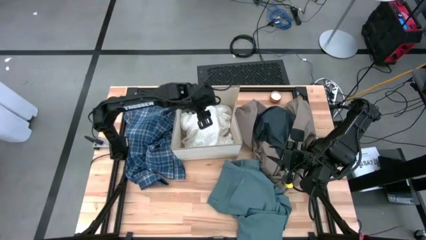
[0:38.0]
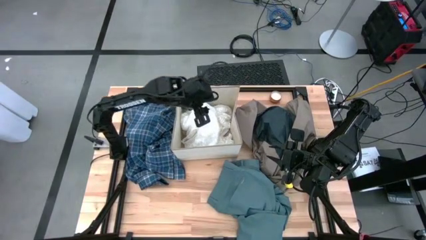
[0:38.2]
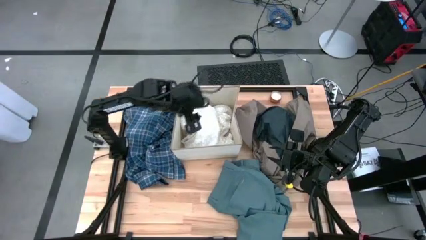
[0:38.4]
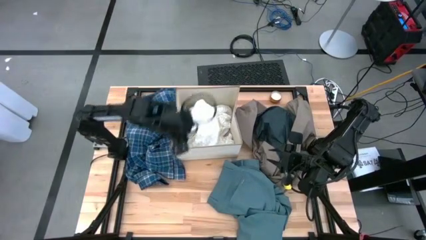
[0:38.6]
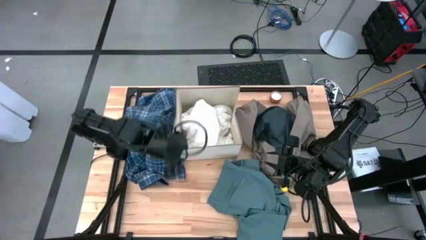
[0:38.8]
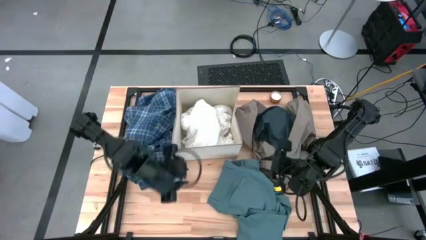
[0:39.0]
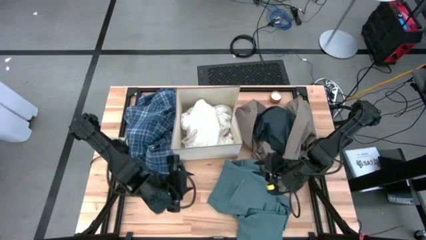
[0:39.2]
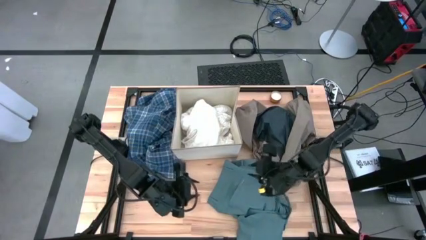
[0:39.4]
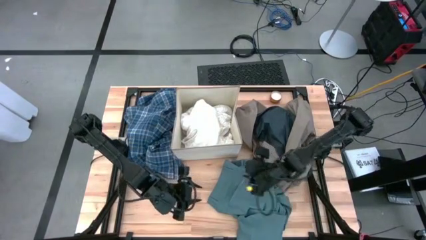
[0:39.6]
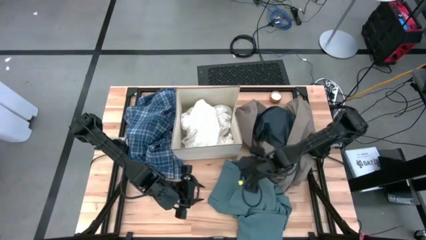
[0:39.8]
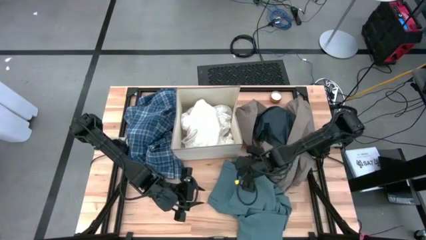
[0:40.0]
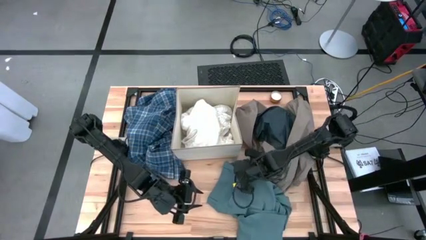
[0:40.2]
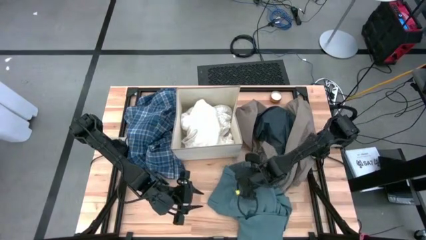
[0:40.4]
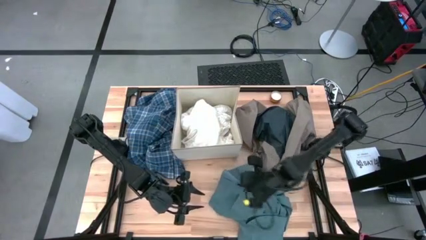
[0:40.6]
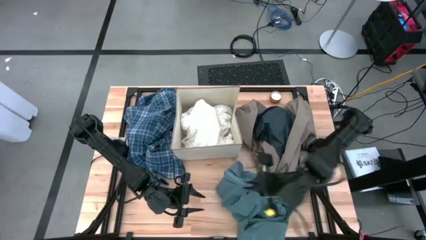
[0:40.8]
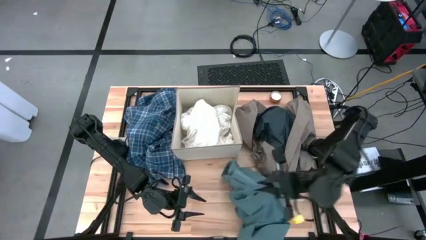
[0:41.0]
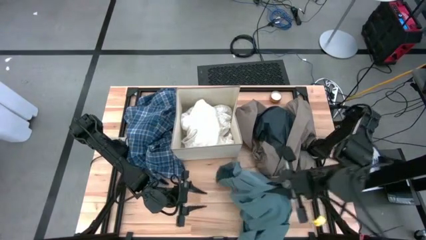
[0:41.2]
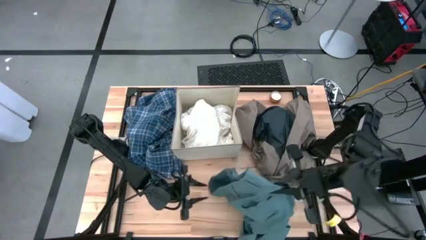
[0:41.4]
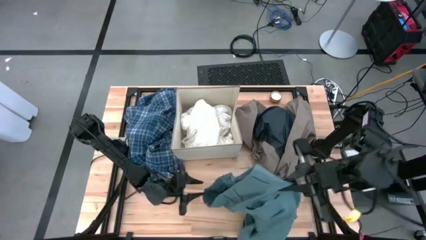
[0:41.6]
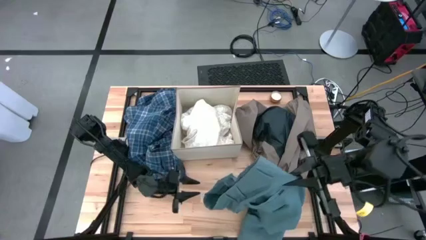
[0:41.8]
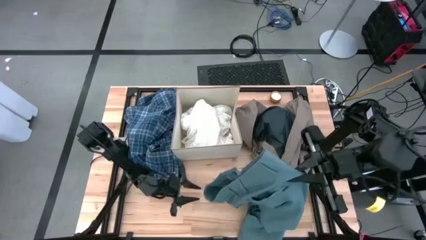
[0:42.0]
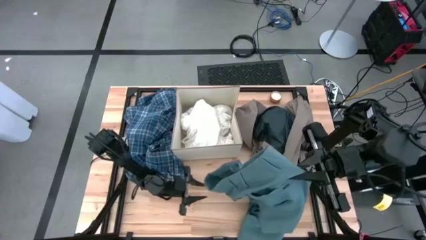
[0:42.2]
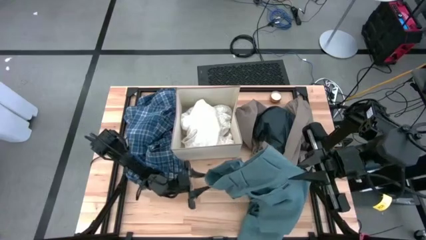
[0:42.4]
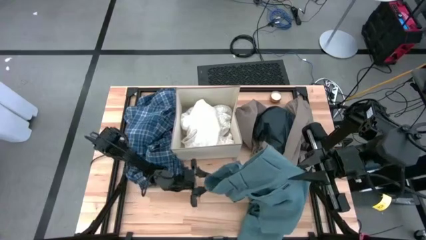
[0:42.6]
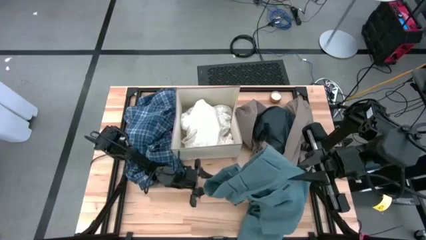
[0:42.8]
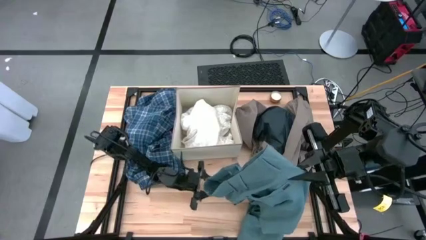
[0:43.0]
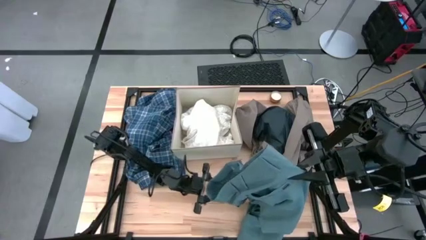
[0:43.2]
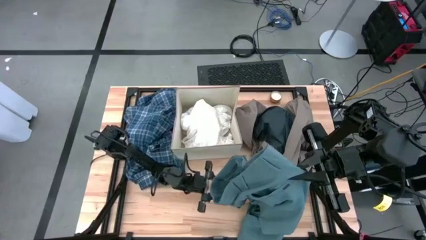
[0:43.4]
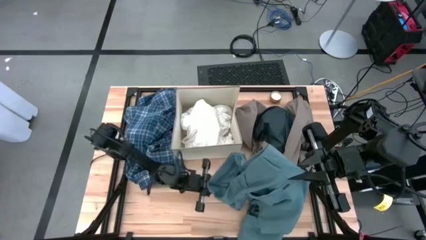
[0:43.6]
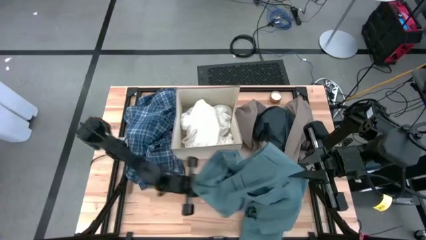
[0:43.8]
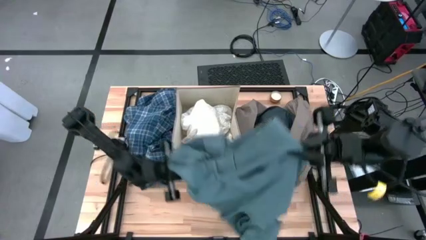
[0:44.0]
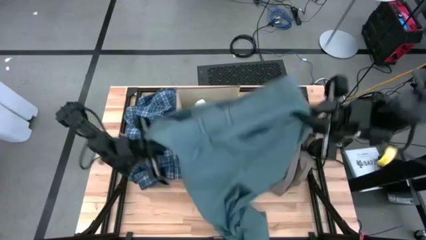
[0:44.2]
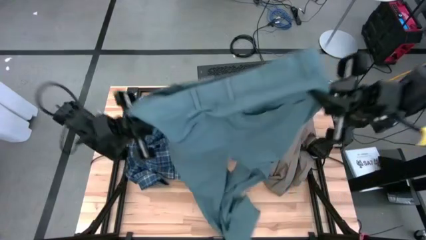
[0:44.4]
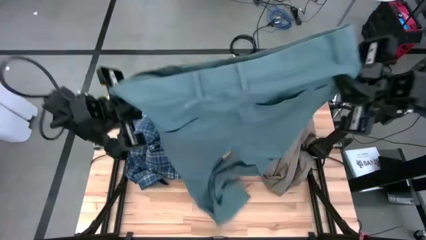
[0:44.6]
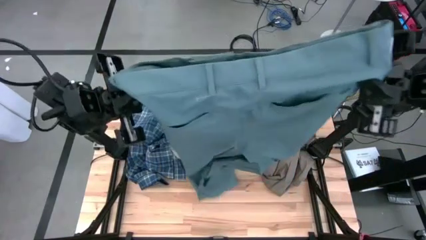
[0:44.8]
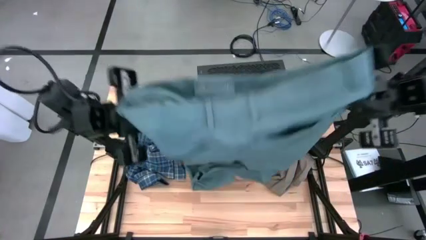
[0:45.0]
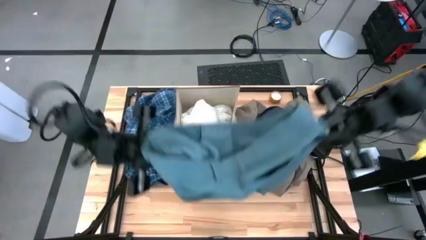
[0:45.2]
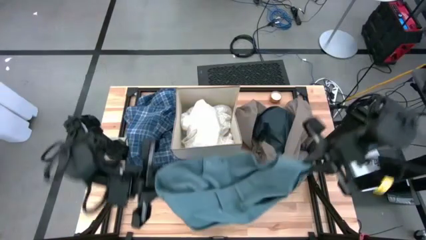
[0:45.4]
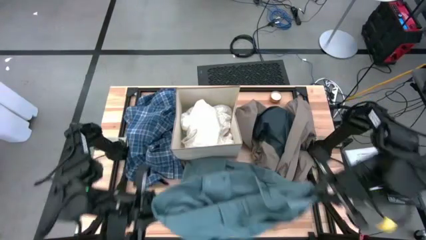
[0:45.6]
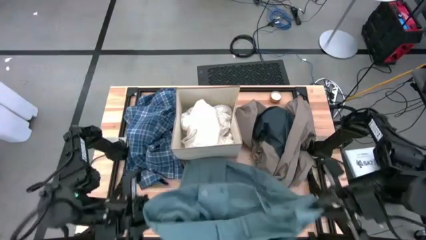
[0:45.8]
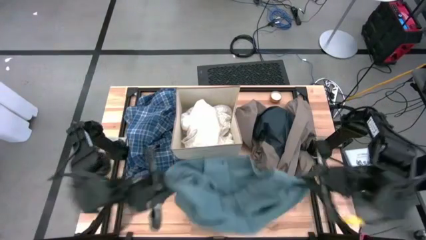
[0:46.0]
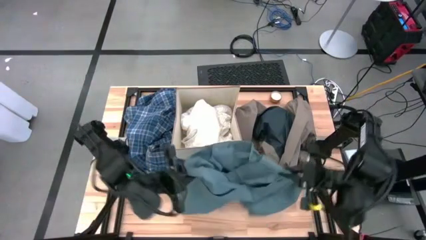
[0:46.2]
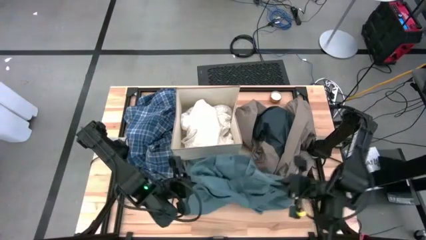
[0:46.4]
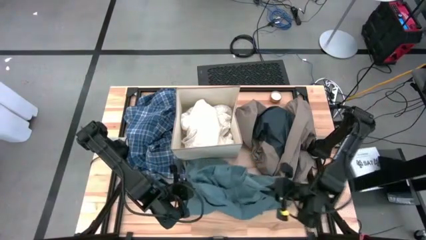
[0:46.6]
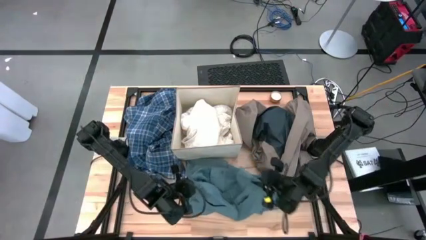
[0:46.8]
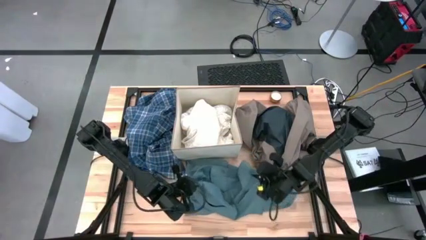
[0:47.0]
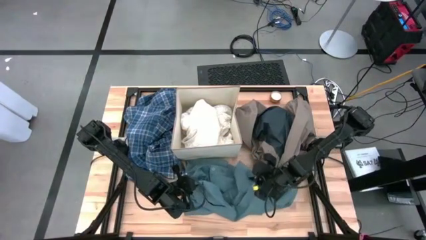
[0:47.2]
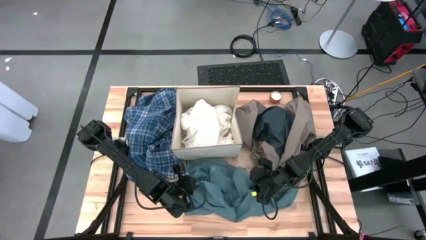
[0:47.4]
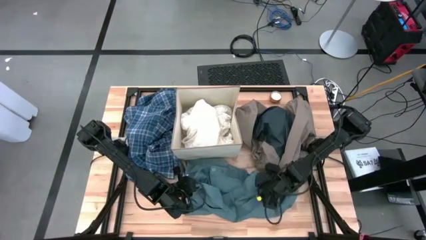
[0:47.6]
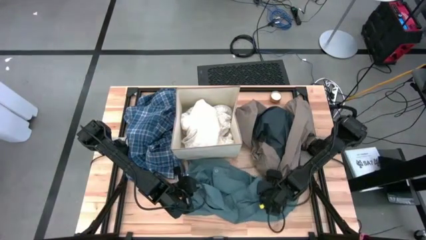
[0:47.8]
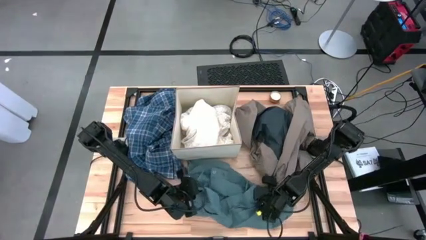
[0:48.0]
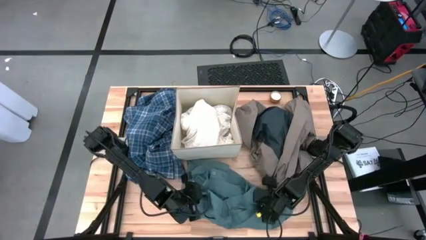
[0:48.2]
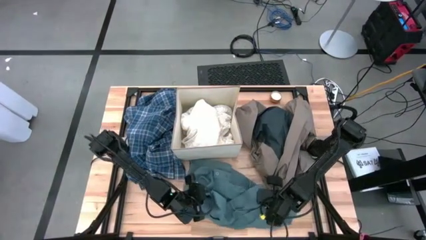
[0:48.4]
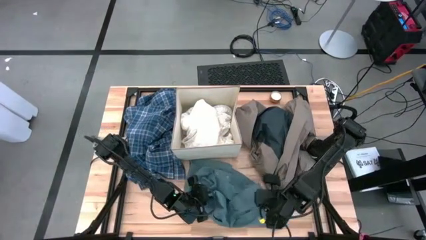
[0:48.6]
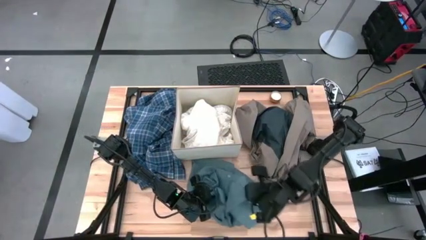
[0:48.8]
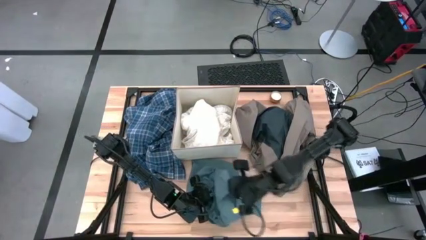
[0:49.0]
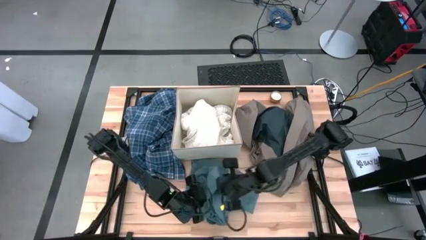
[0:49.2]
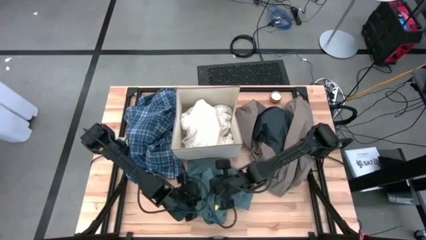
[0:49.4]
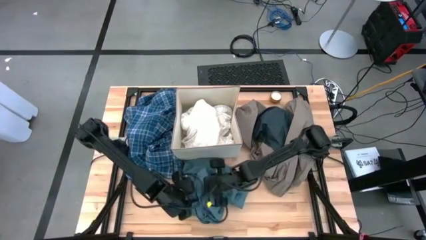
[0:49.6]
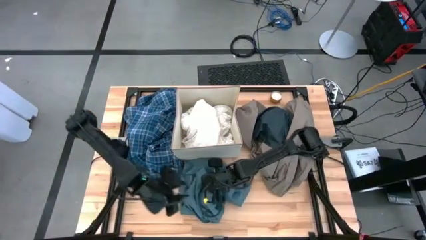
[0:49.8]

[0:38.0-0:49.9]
Task: Sort clothes
Put the blue, green pants into the laundry organizer
